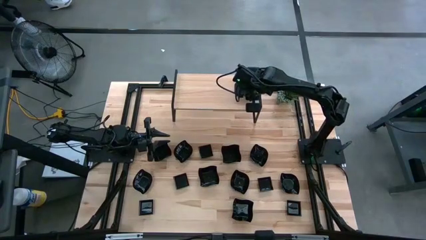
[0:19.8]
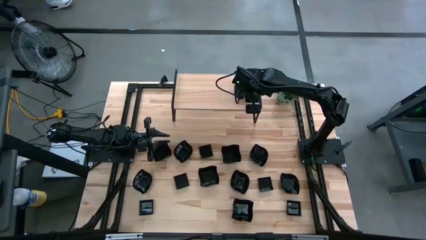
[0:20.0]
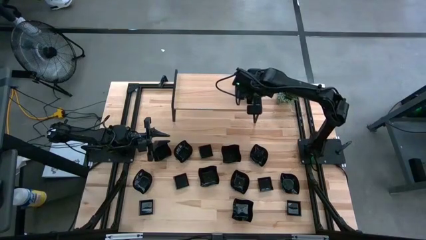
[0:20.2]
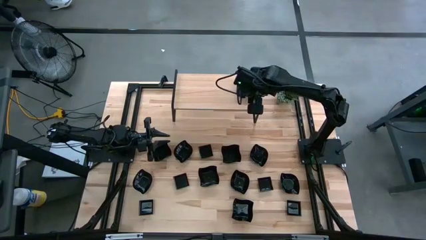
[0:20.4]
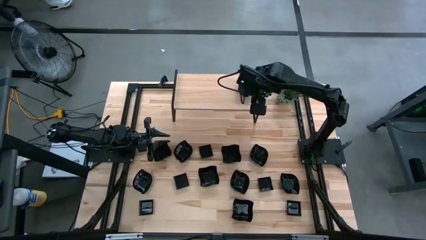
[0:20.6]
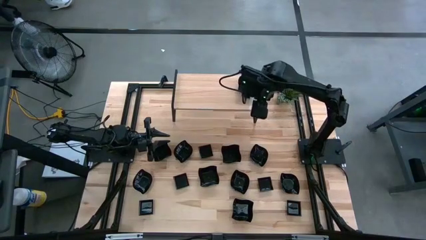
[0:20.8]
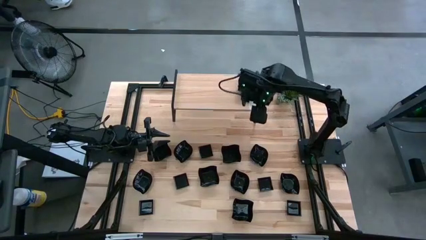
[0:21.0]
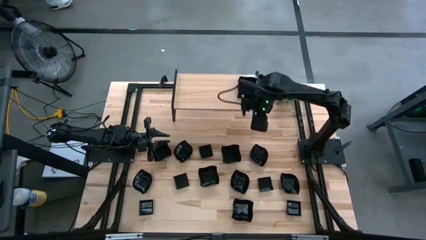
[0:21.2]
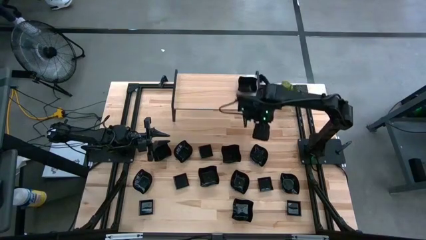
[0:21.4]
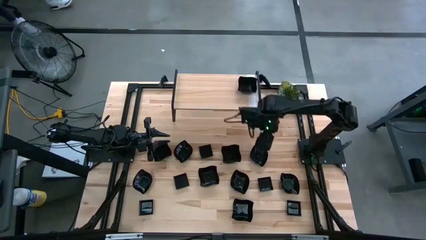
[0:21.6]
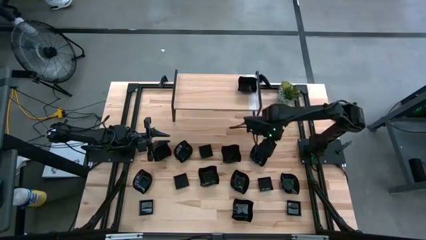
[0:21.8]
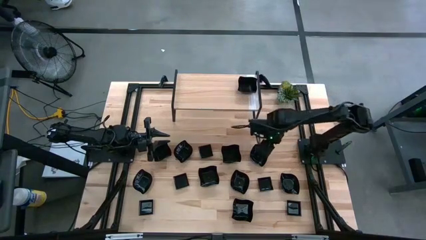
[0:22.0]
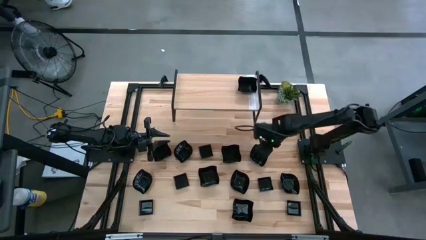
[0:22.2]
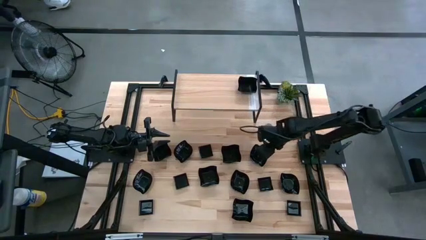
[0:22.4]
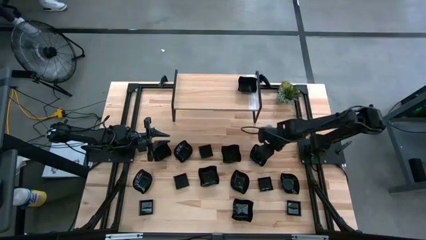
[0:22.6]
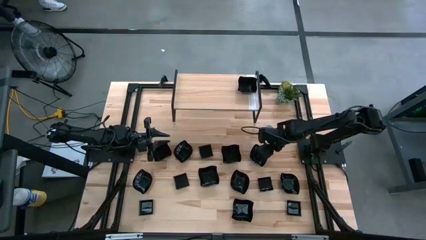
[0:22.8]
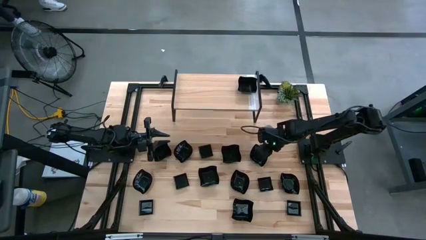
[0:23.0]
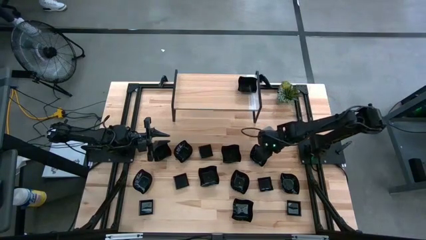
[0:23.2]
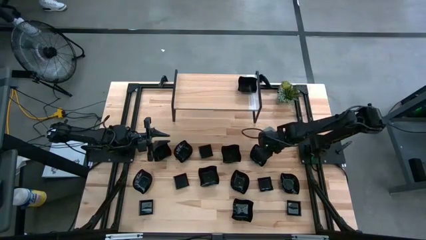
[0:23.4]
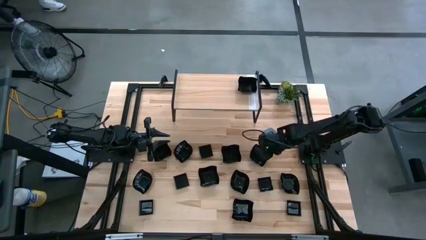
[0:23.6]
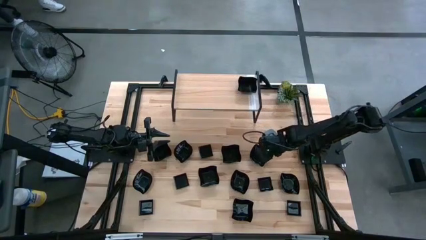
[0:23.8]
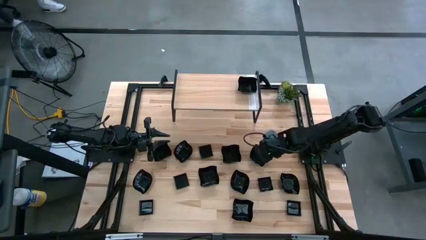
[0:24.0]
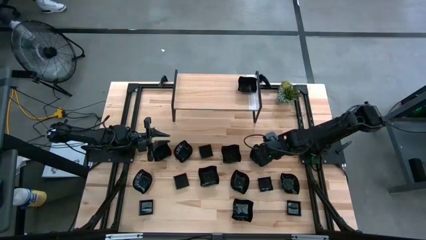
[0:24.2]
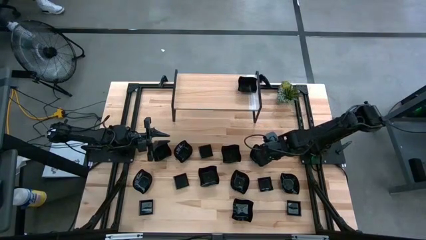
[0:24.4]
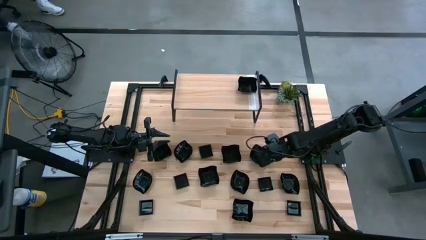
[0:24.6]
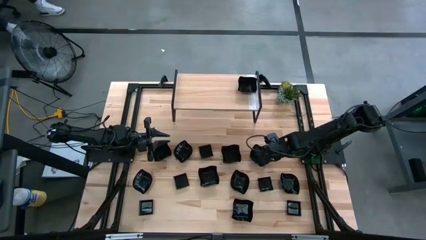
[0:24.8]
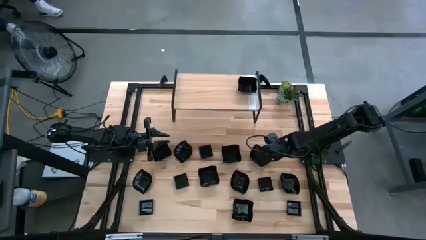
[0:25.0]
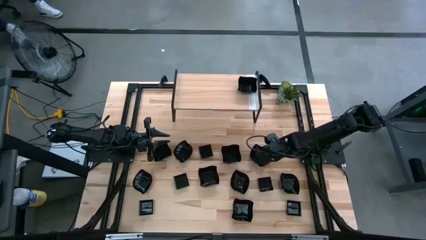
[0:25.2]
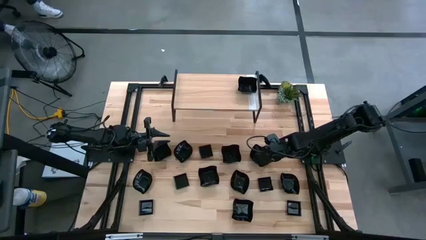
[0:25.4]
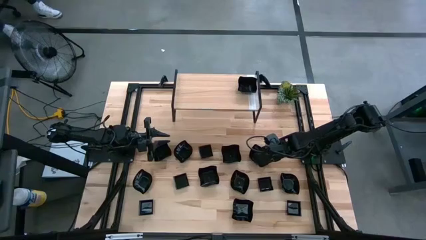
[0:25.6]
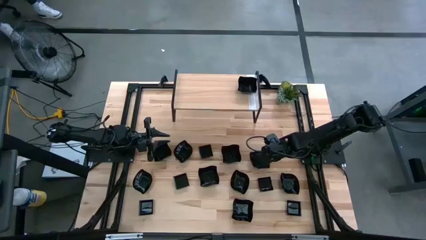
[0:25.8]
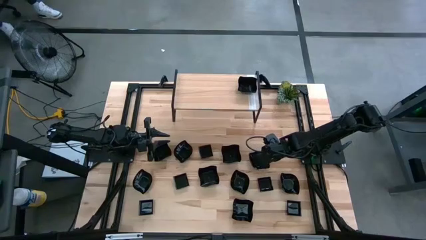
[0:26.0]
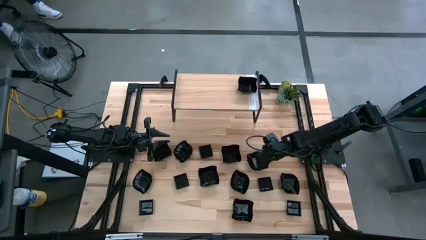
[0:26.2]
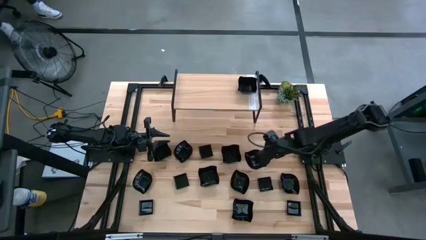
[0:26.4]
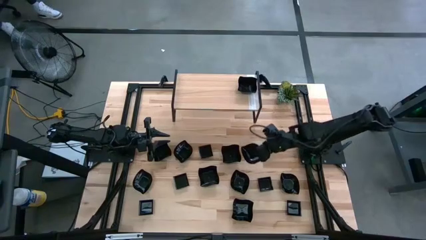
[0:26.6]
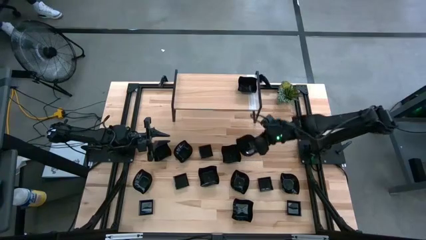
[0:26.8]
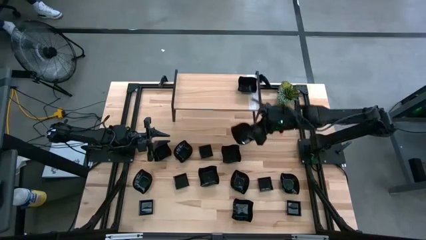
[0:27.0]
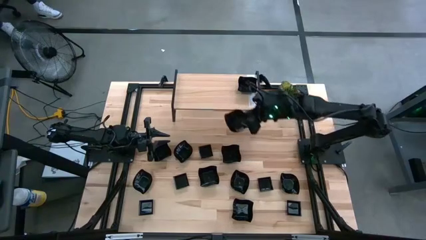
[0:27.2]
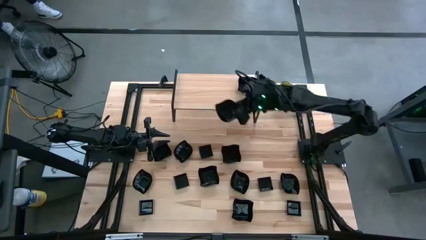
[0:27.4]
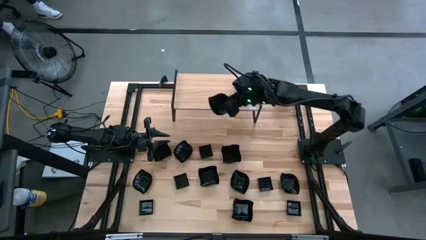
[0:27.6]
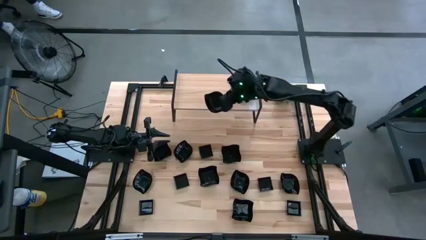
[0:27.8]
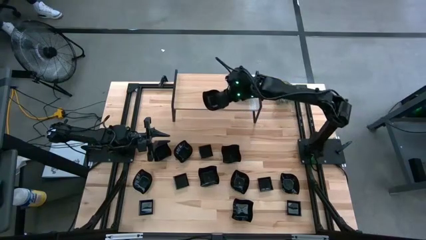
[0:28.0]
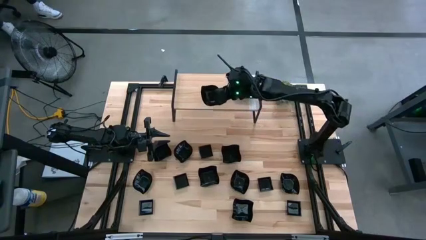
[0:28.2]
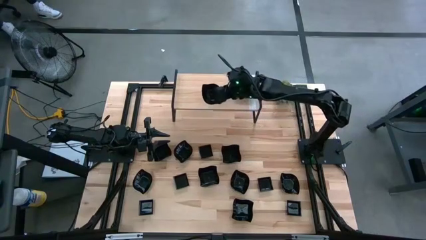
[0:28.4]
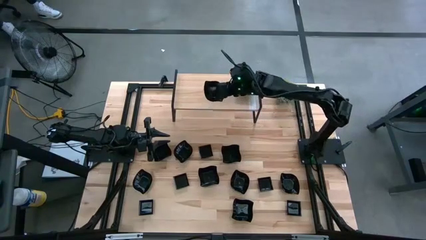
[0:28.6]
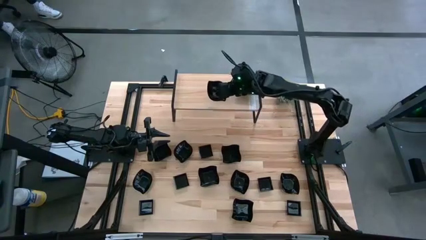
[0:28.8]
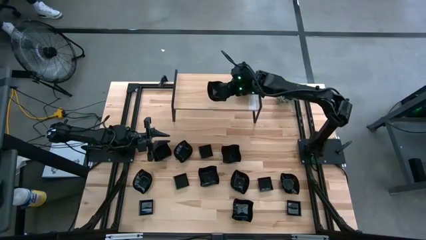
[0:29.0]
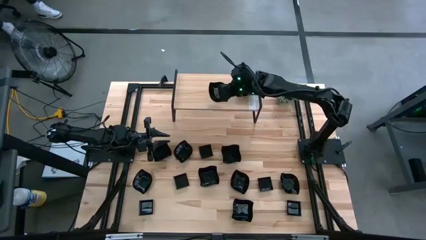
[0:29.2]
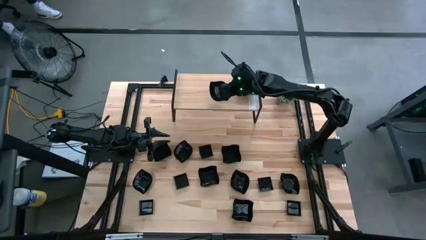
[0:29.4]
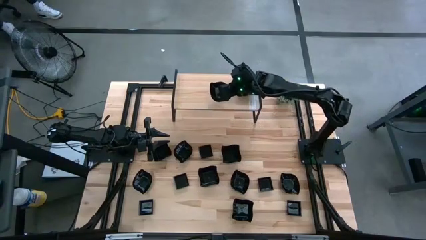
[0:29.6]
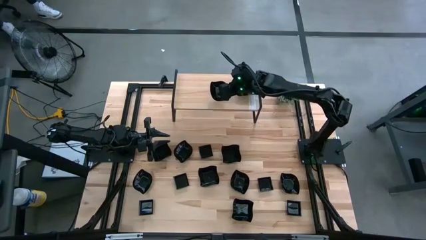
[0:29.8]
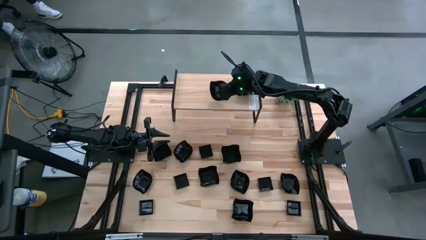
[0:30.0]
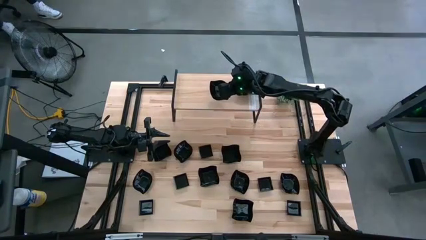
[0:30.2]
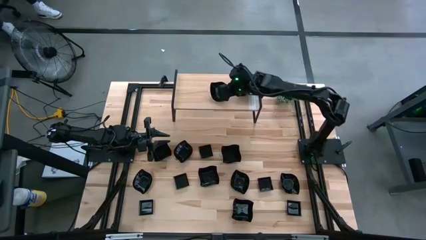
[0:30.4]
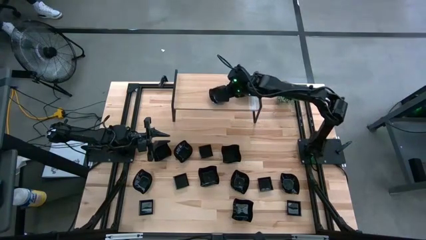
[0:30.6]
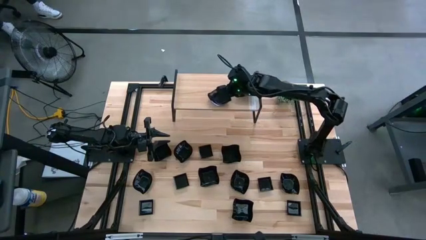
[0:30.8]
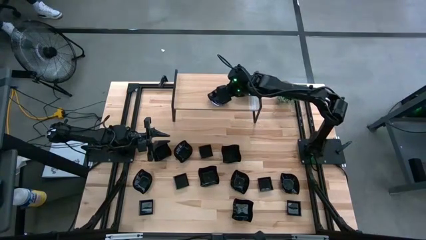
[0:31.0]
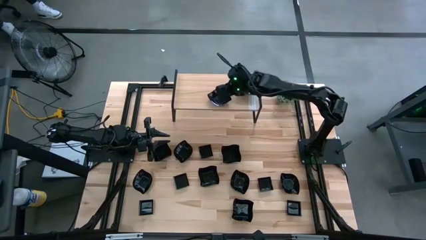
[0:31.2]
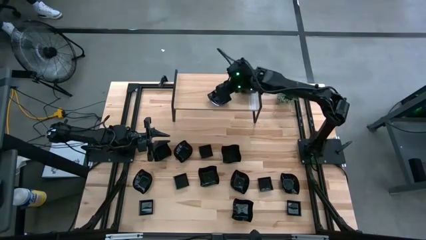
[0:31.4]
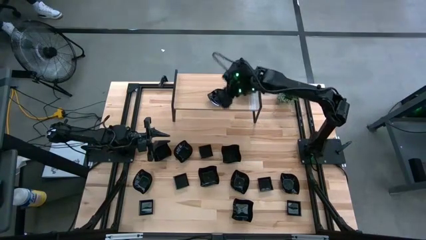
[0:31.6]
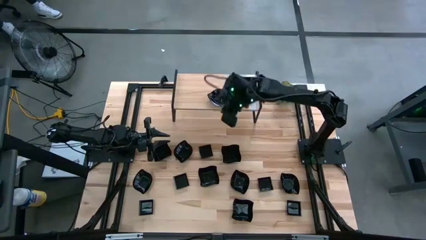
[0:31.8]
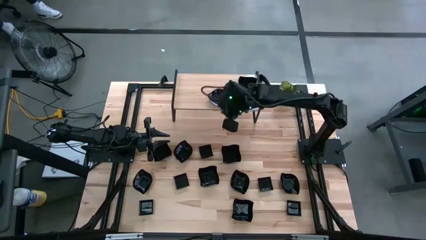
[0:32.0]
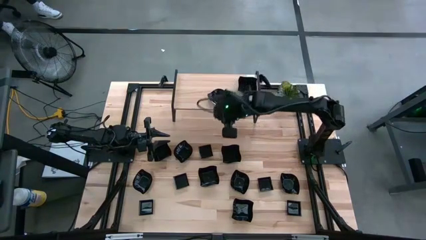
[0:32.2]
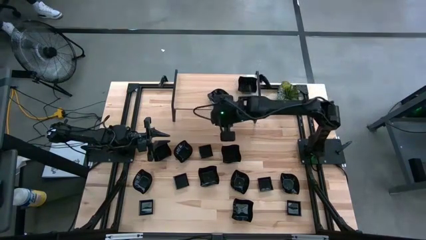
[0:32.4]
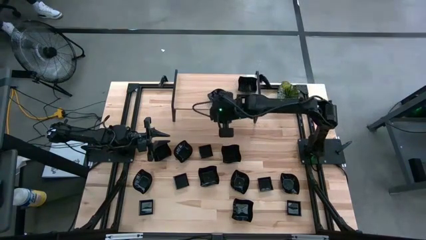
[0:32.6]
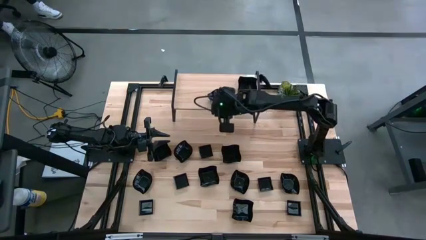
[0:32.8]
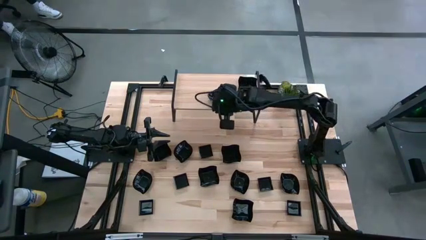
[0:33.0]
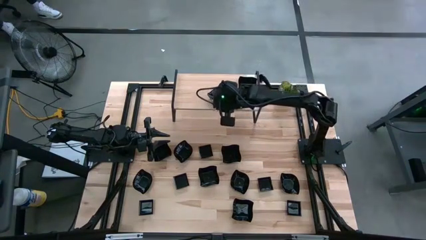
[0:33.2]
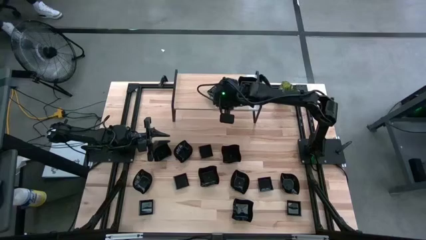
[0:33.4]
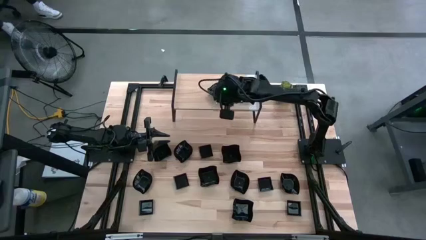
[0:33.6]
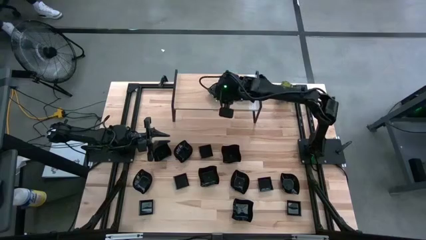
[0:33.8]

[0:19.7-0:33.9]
Task: Pick & Place Mini shaped plates
Put the leaf-shaped plate on the shelf
